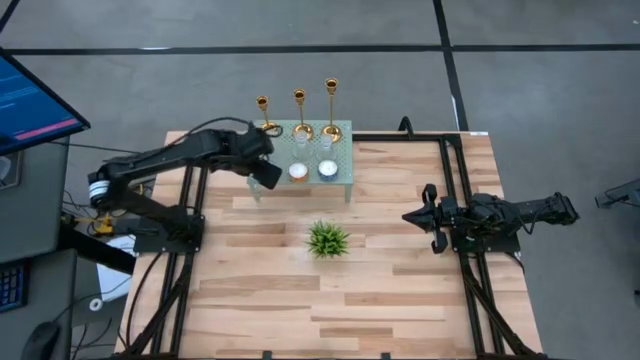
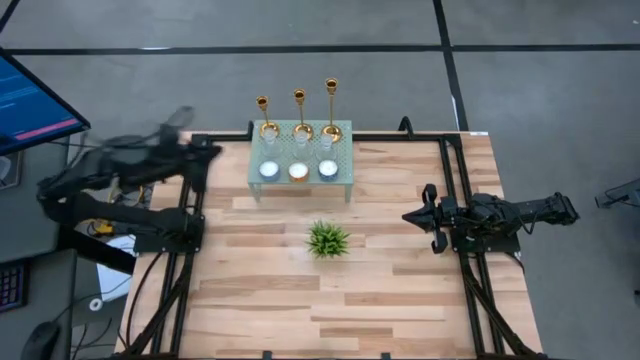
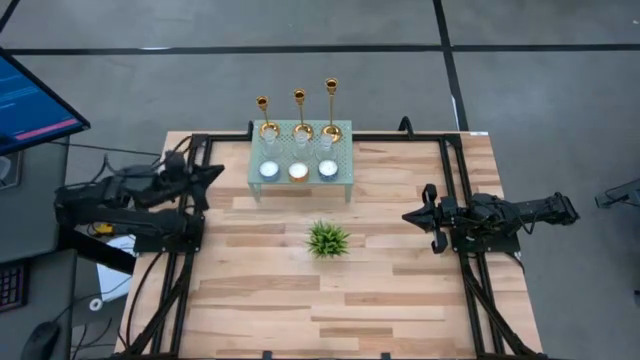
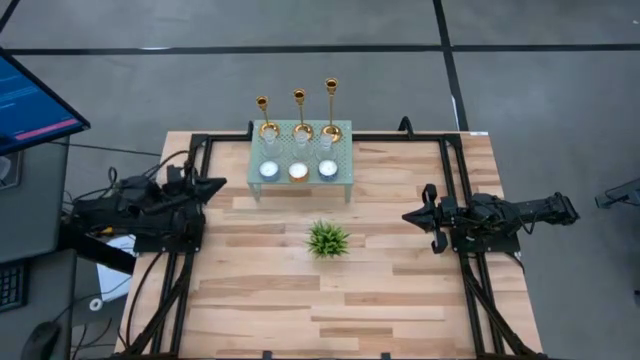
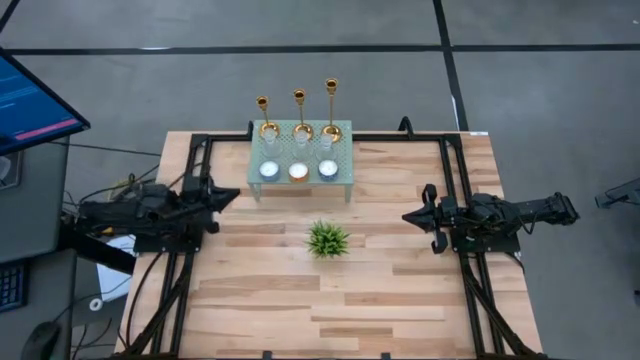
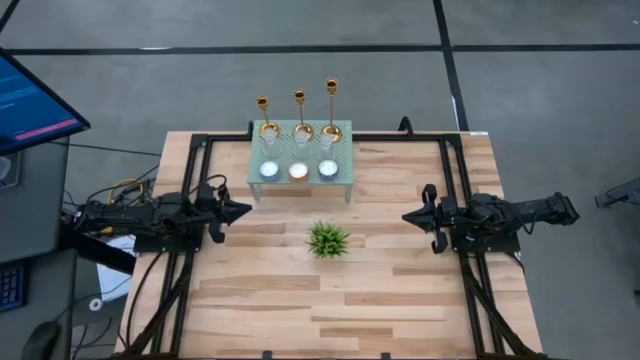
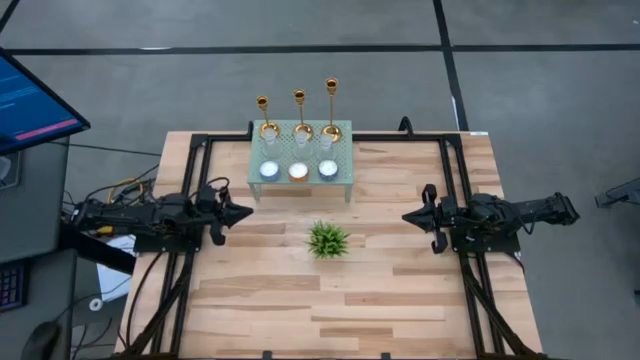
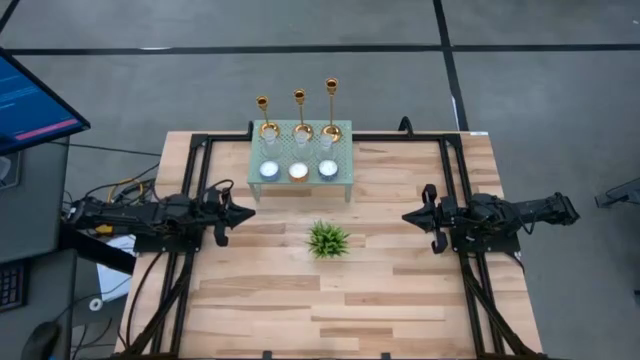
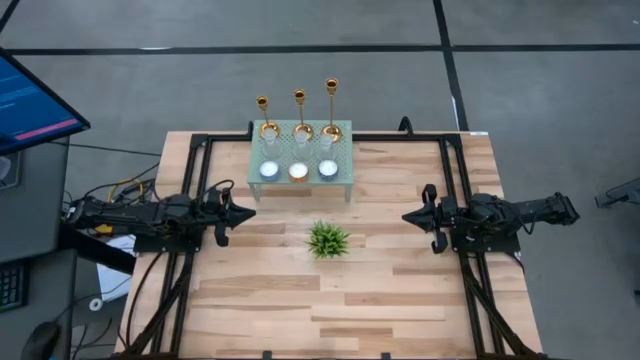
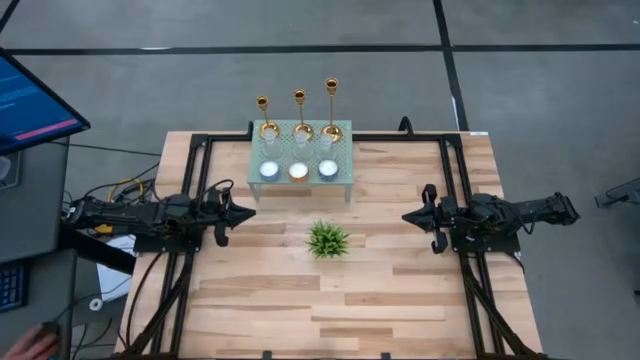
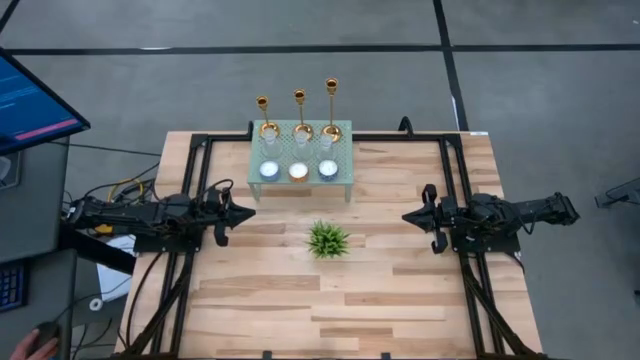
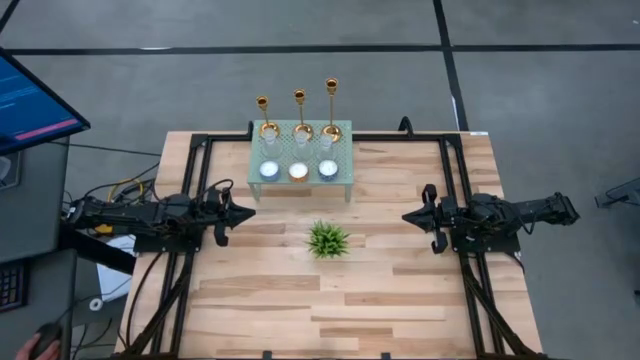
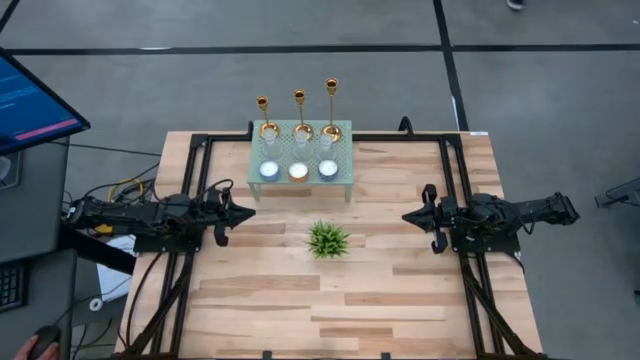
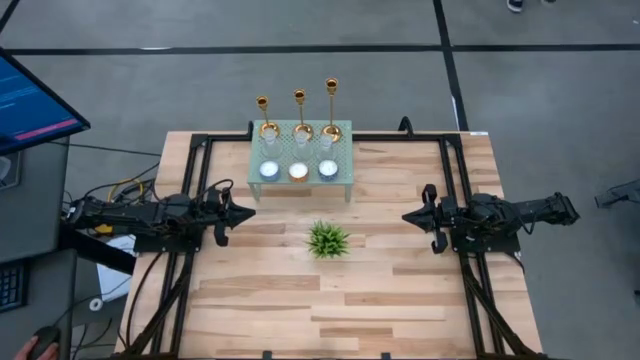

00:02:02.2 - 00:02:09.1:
Task: Pick & Place candle stick holders
Return to Home Position

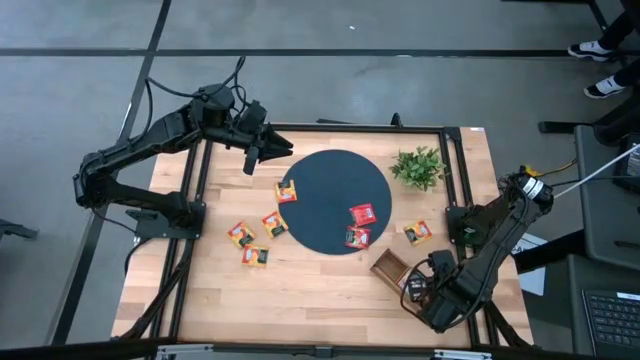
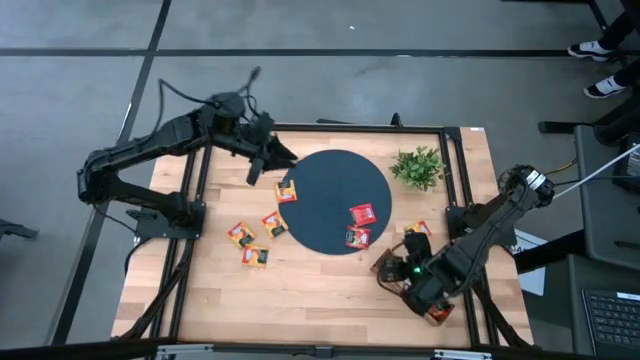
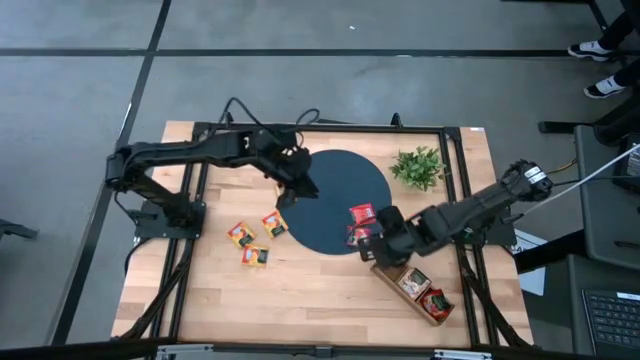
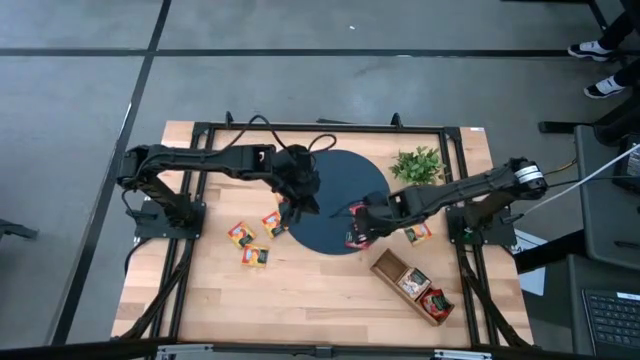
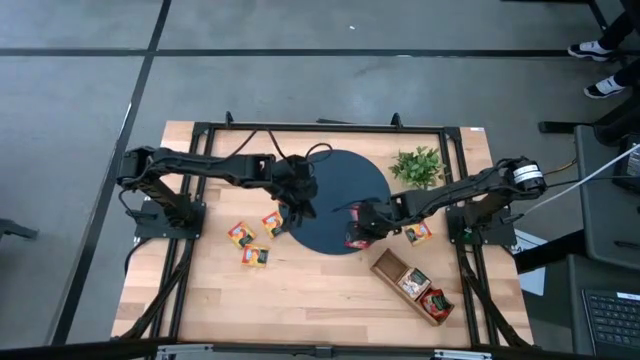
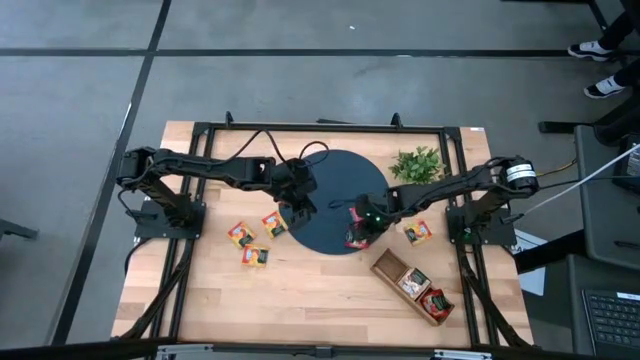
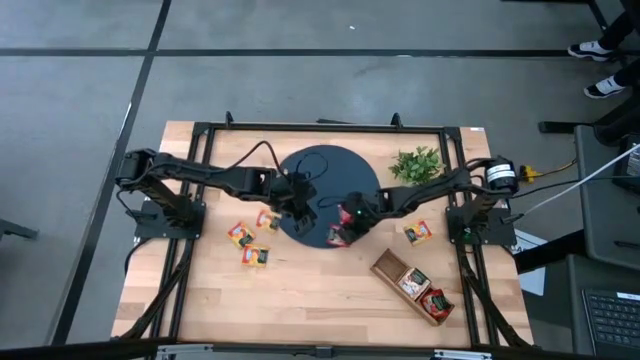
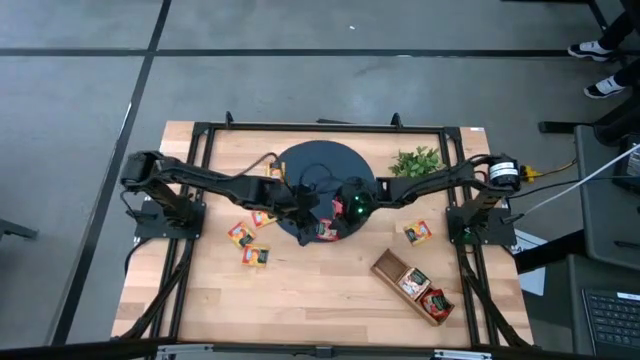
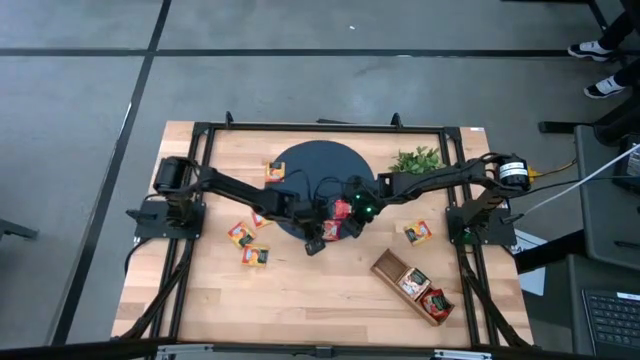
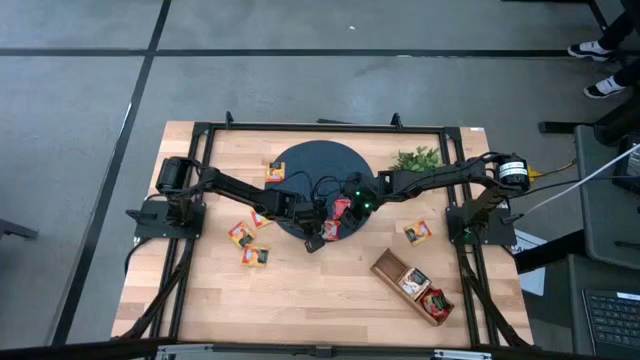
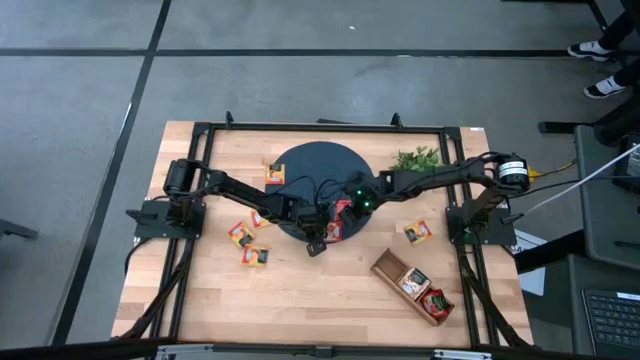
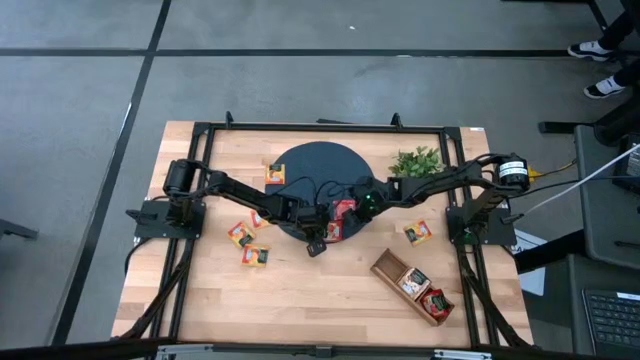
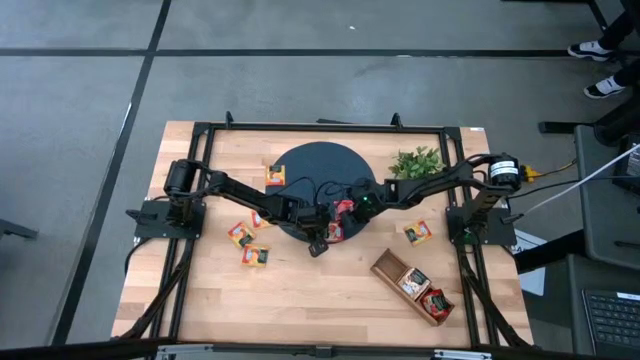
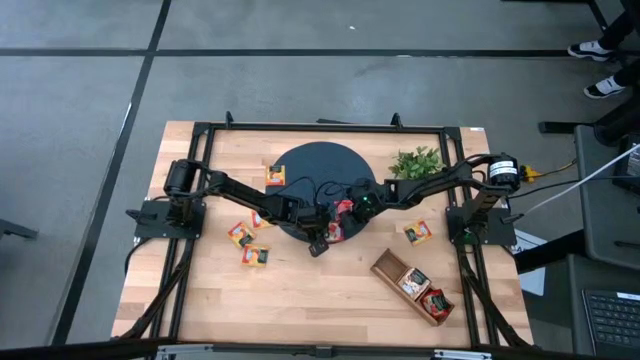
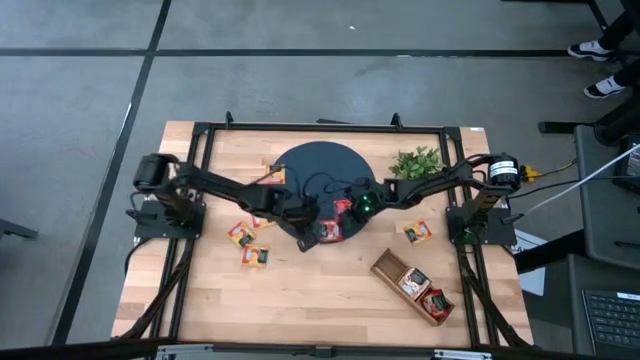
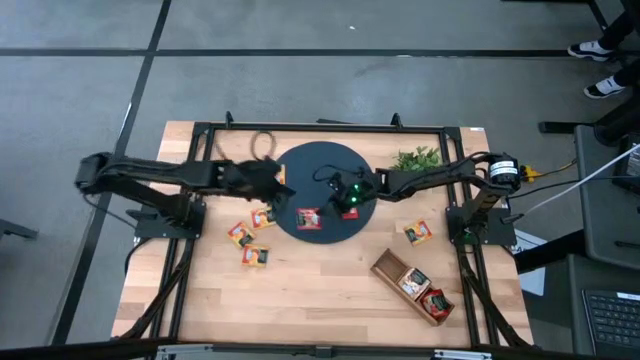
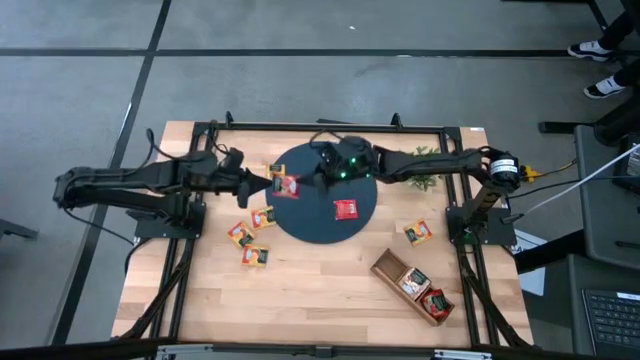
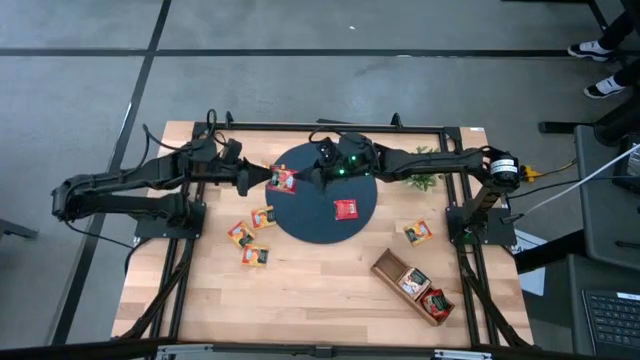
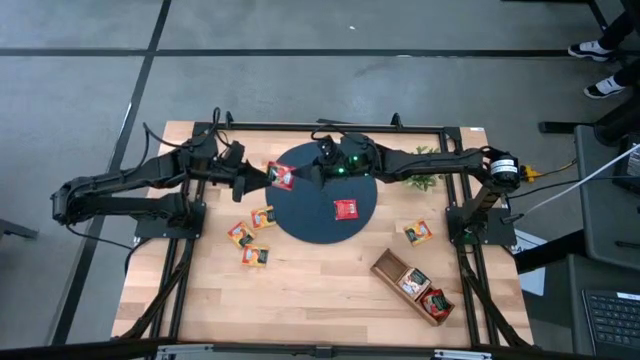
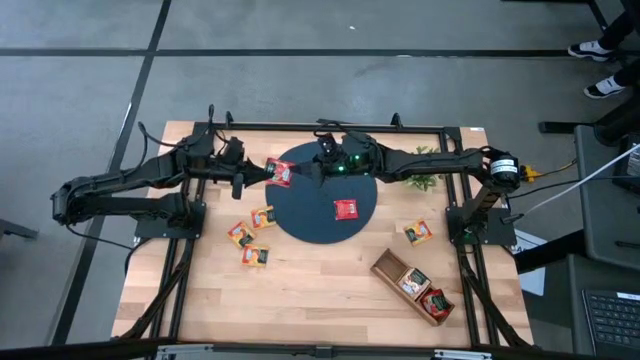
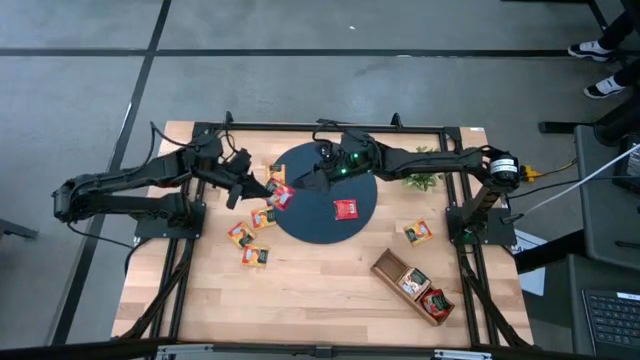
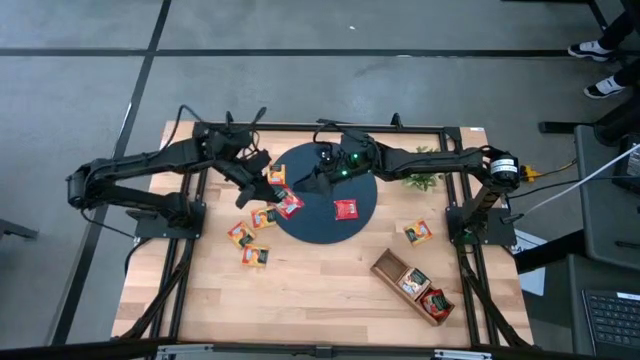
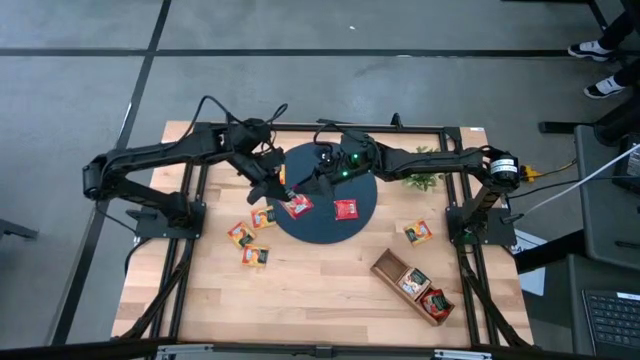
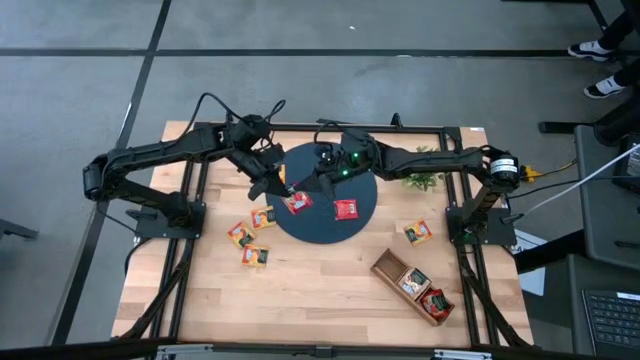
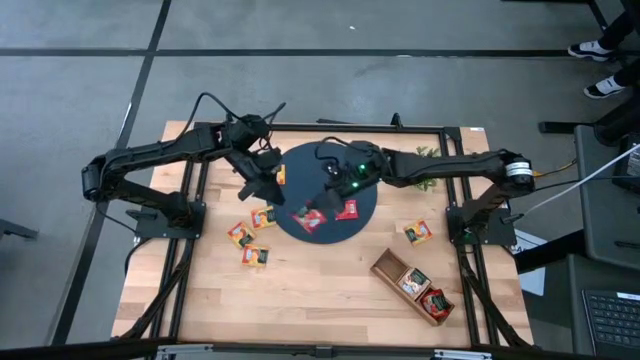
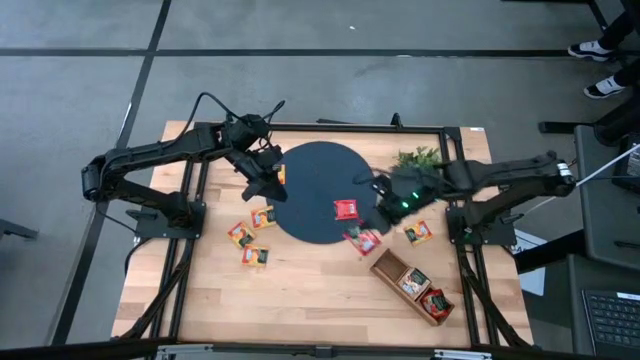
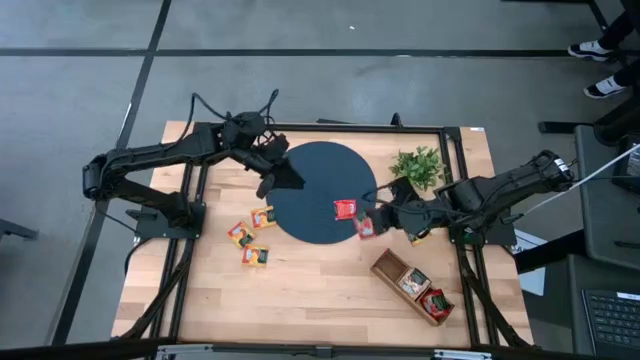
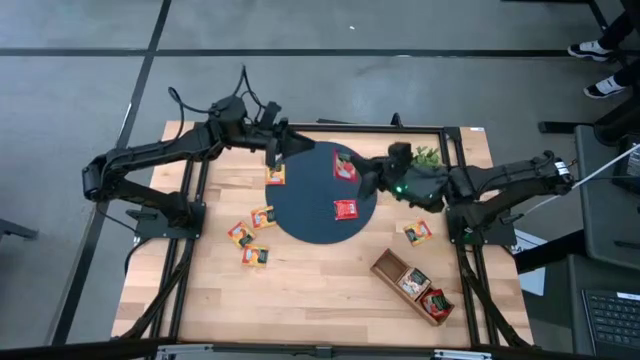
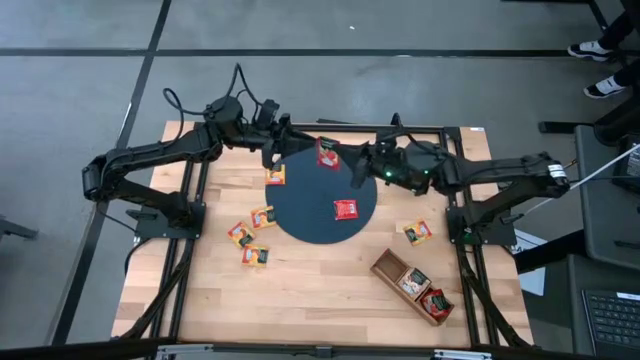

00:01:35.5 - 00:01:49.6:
Task: Pick & Place Tea
Put the red tea bag into the right section of the wooden organizer
